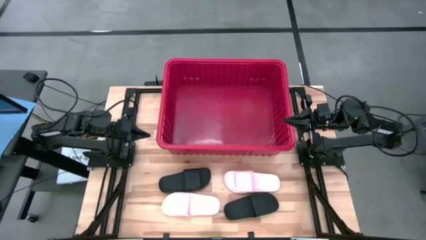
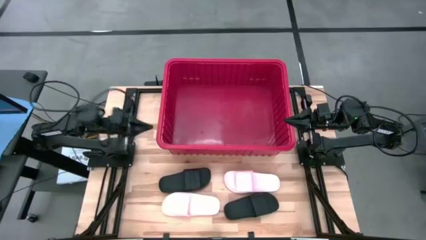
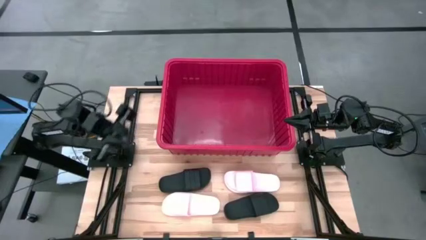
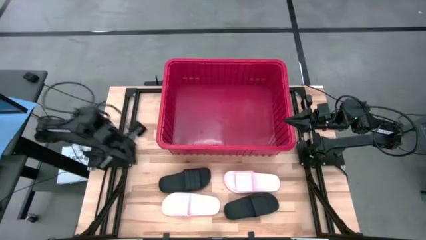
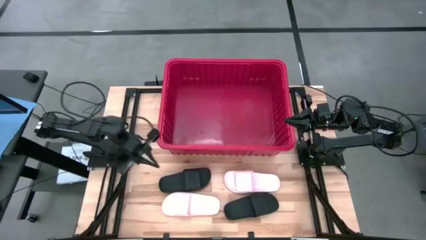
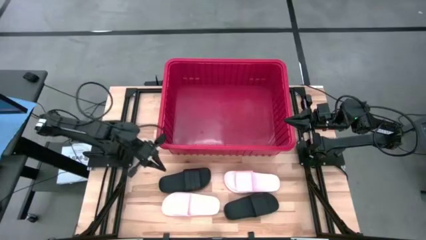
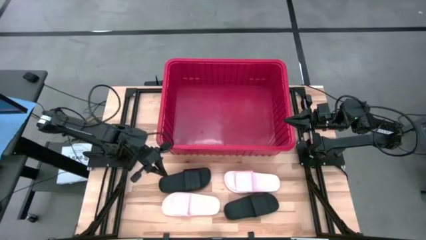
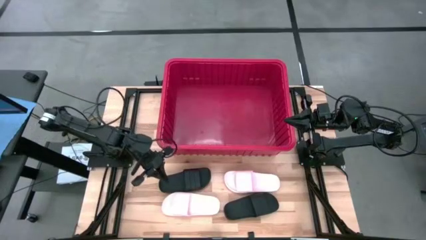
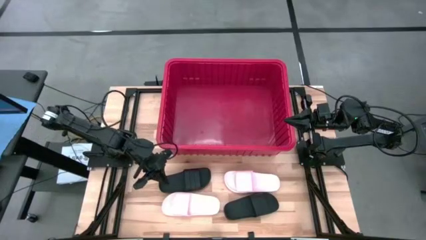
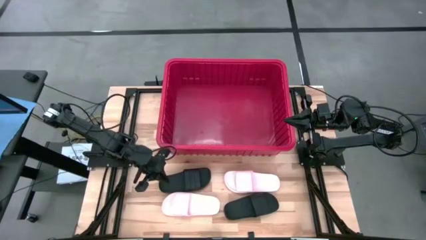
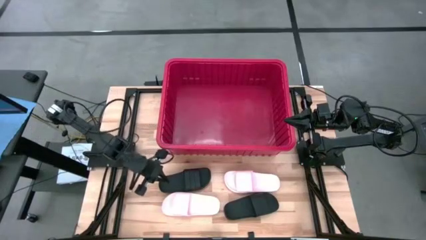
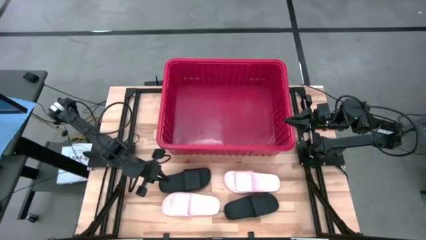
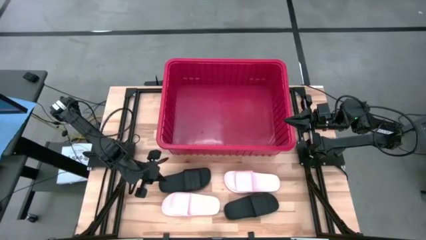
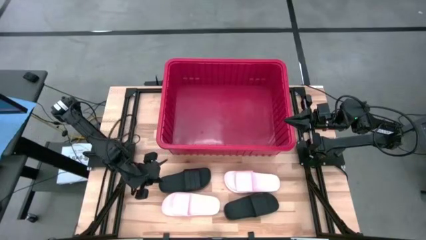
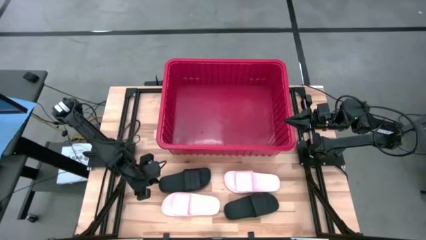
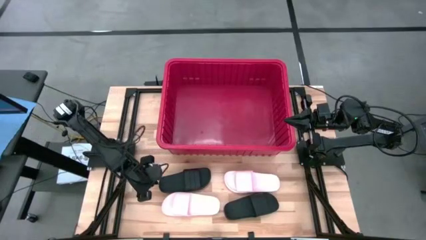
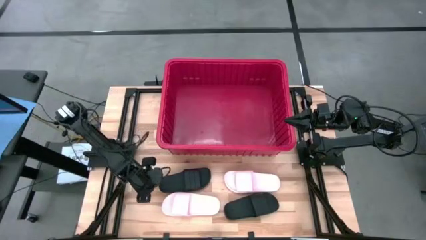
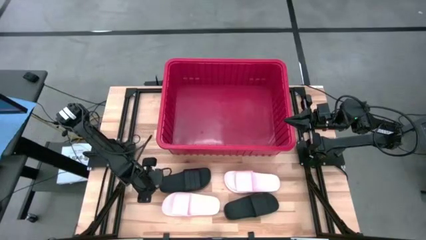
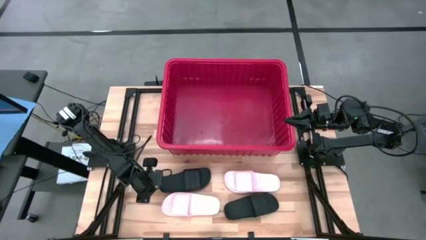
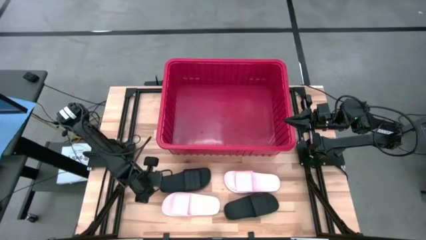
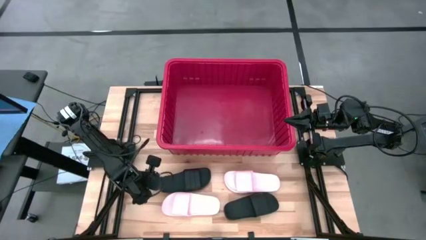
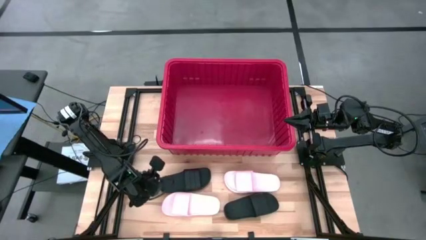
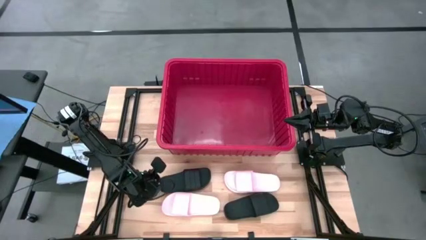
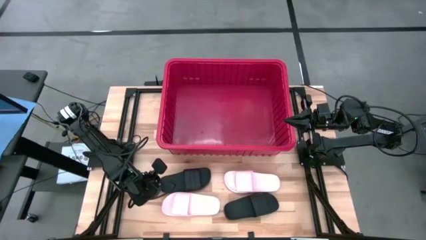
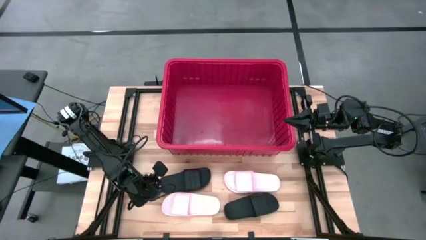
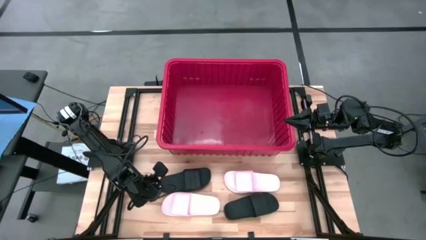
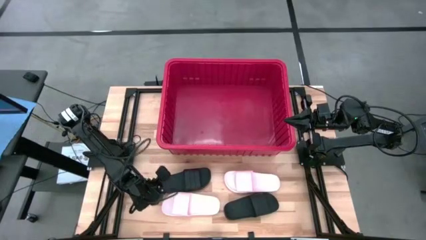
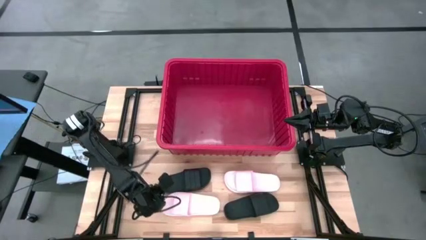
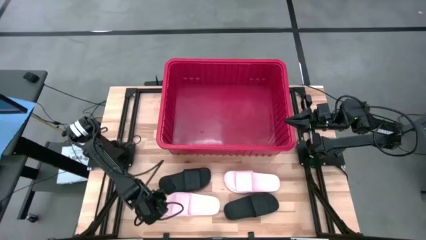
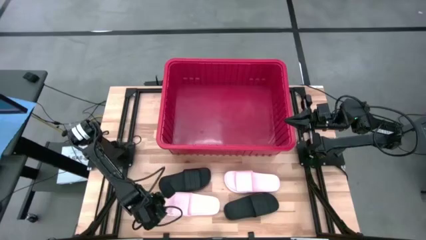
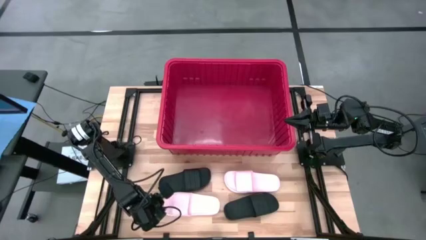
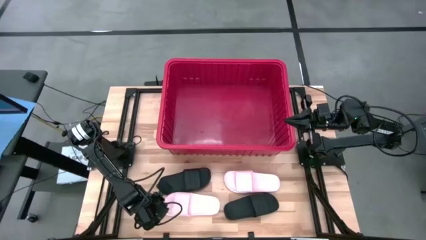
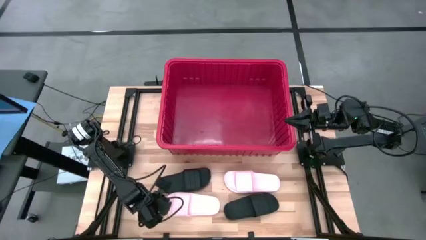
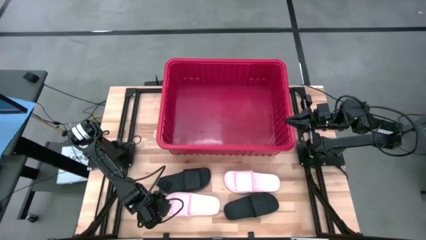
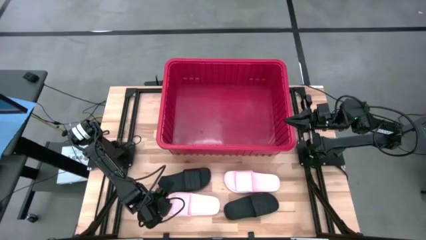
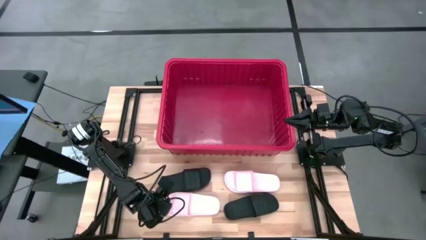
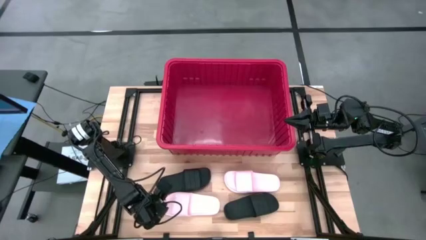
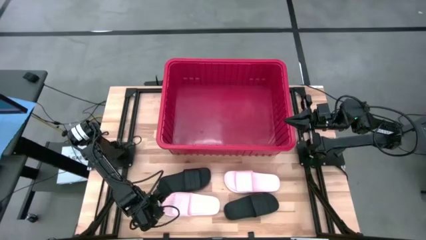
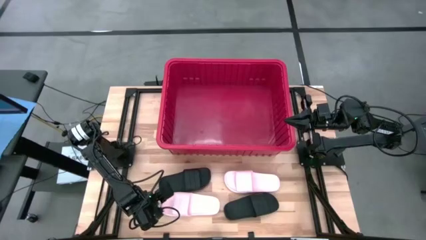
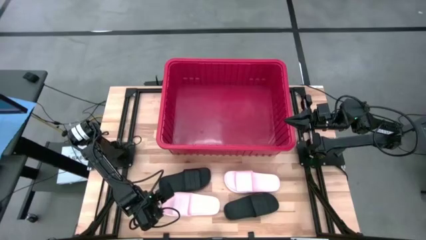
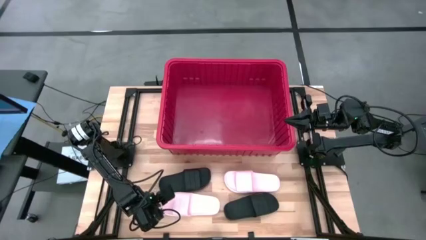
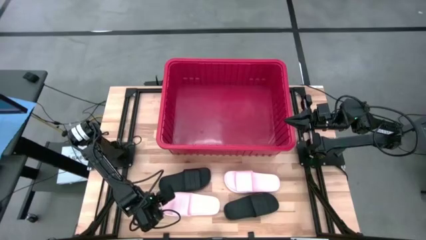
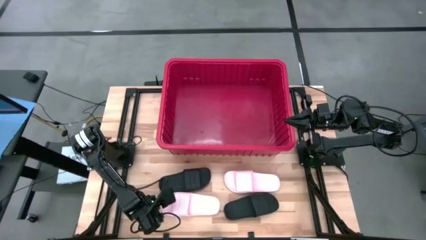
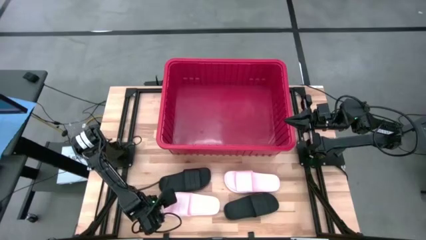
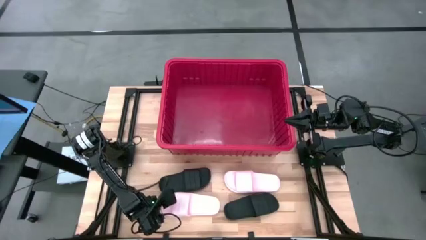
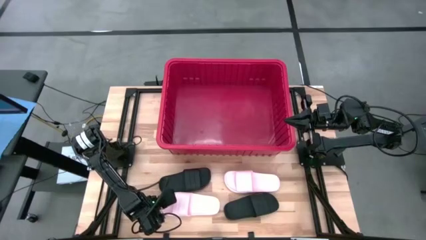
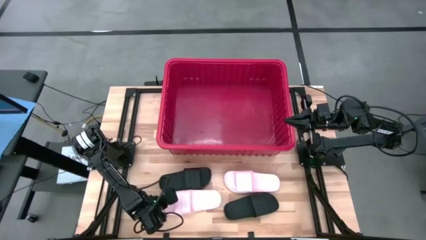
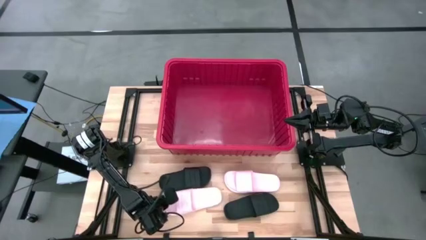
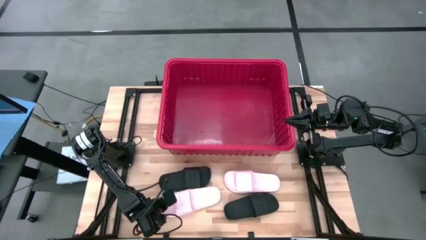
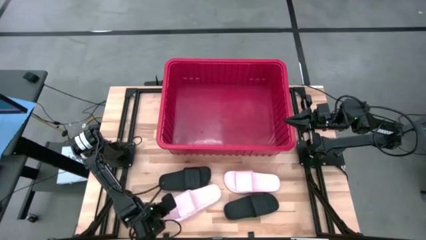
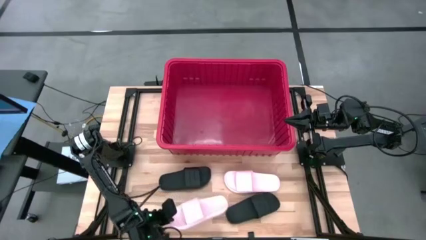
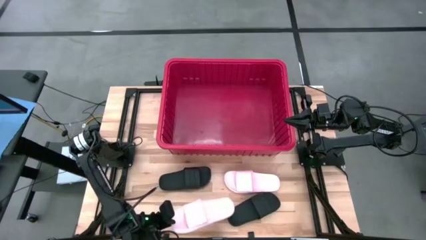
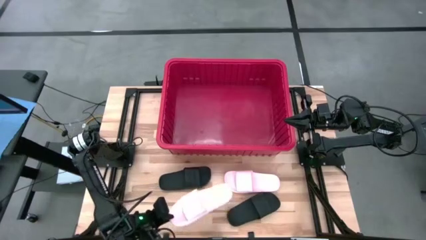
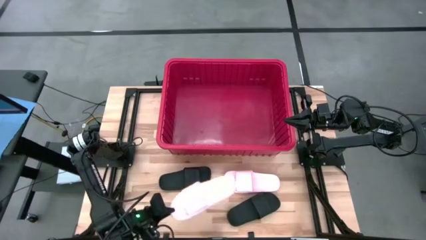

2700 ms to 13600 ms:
Task: Pick and place slides into bin
Put the left pink slide into the bin

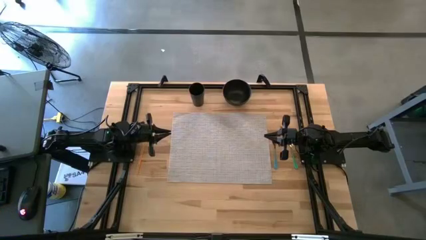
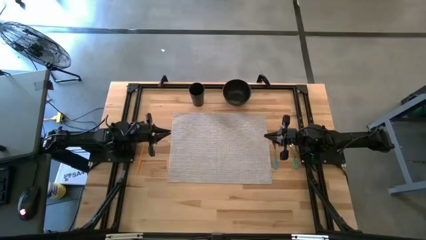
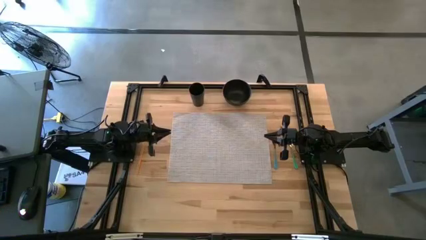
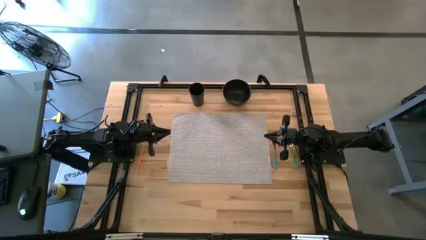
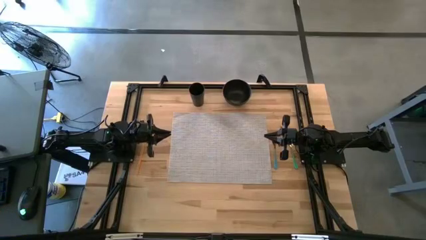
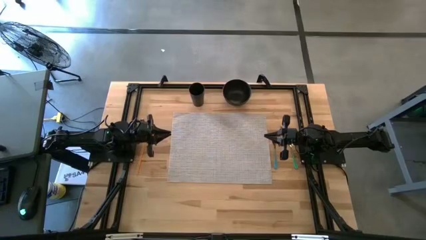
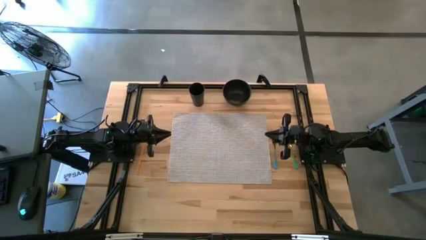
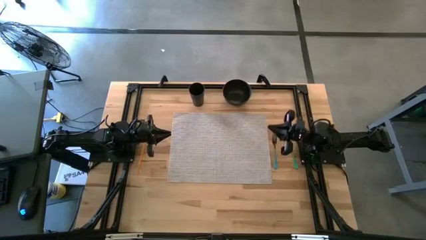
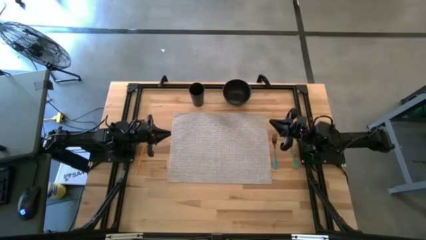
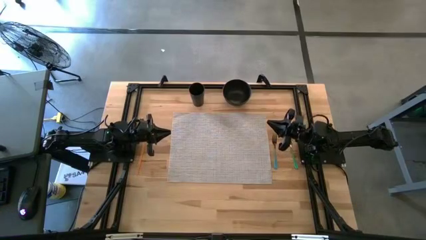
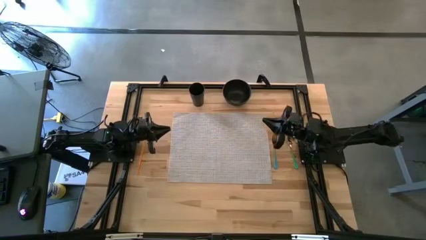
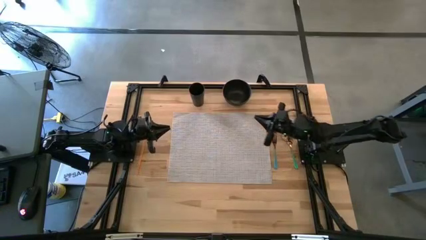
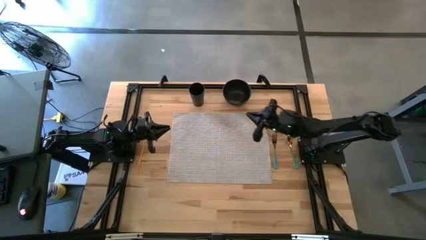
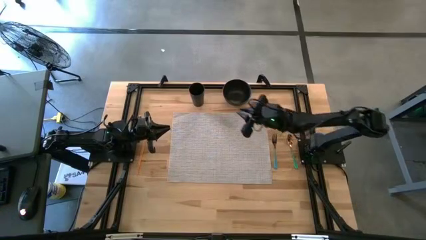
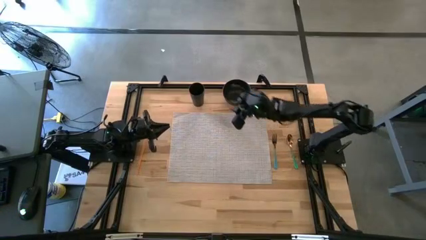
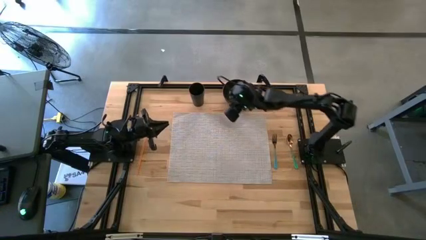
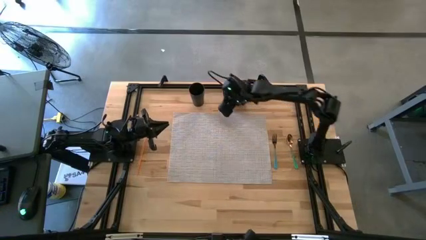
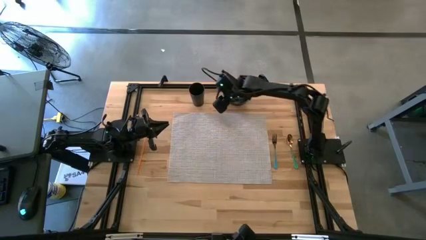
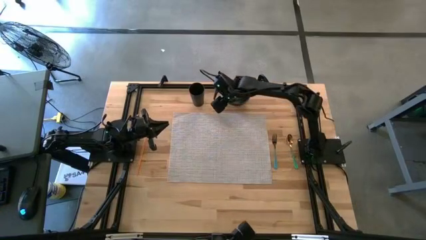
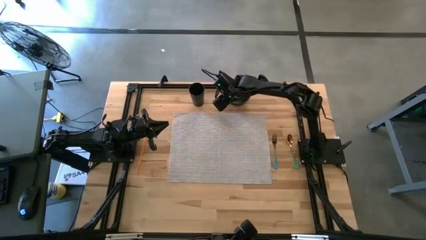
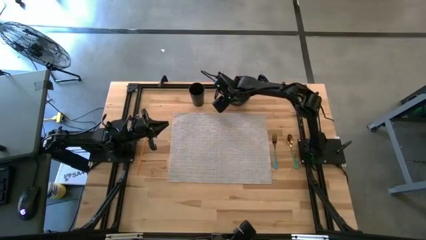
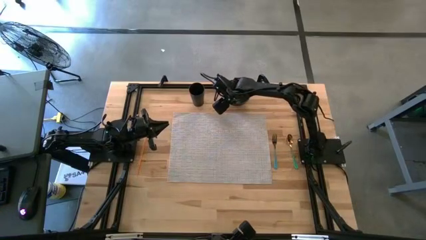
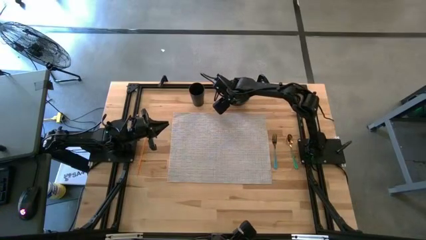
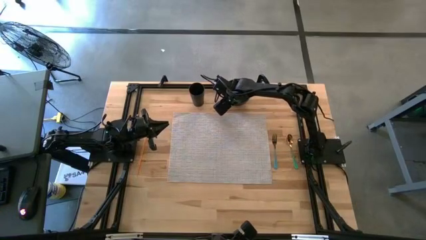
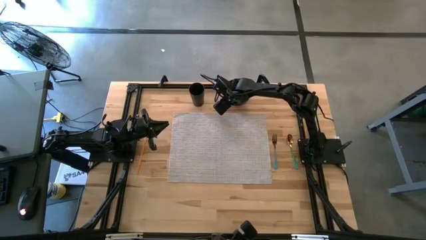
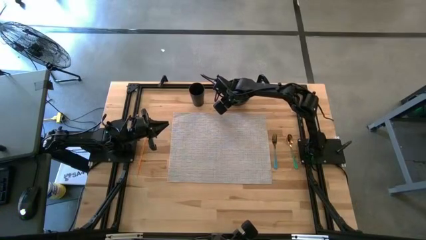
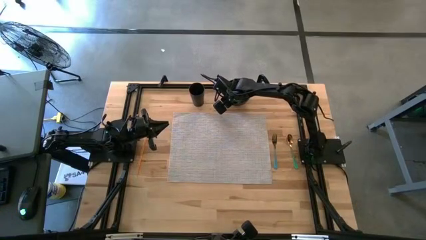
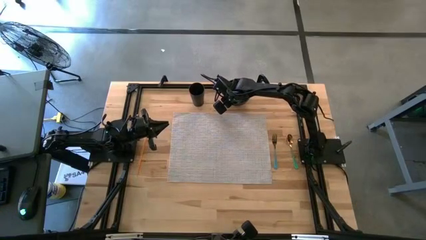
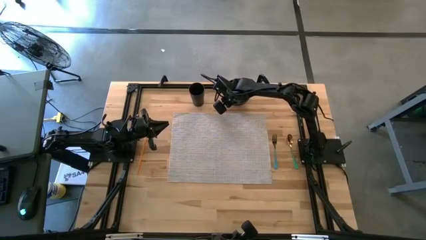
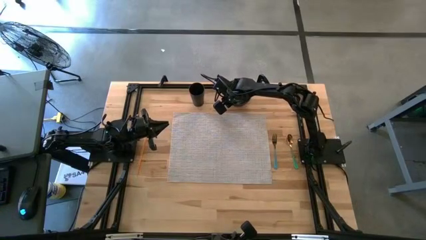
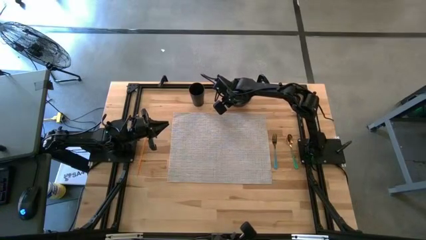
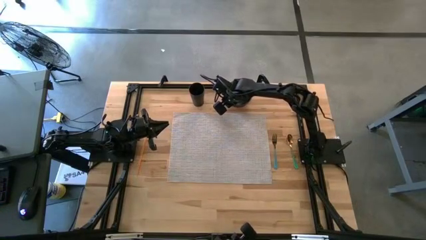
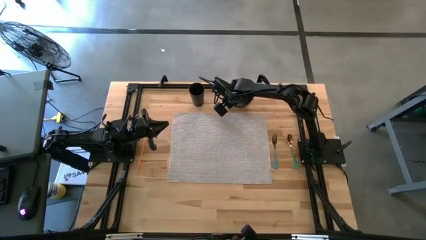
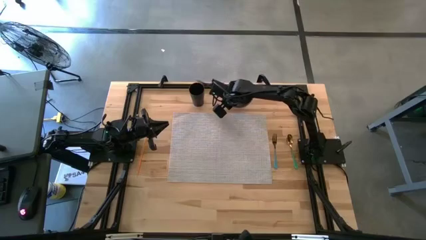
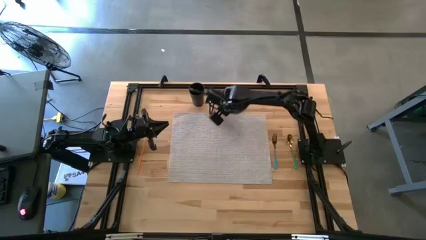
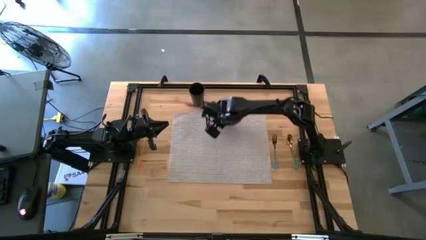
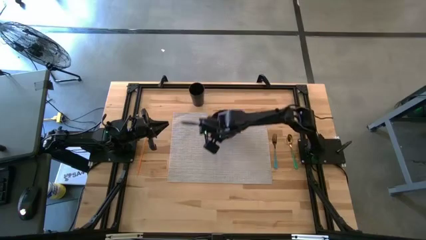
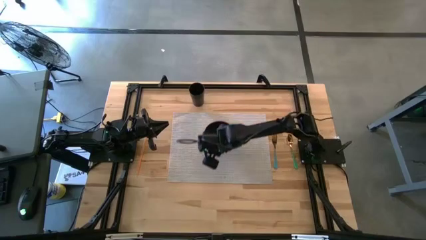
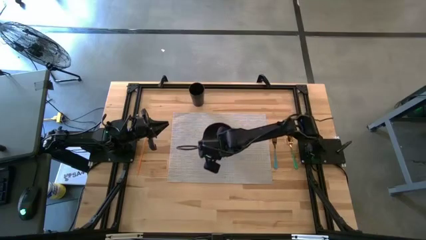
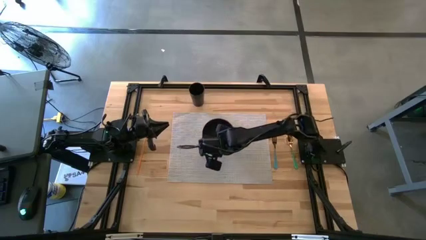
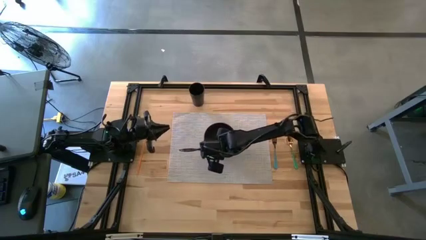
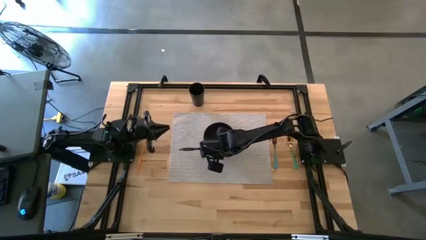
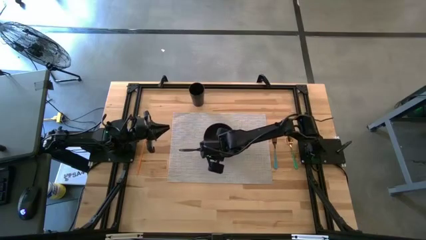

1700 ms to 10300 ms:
Task: Pick & Place Utensil
Put the black bowl in the middle of the gray mat
